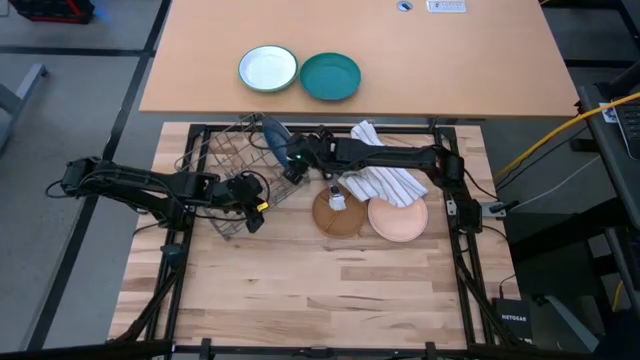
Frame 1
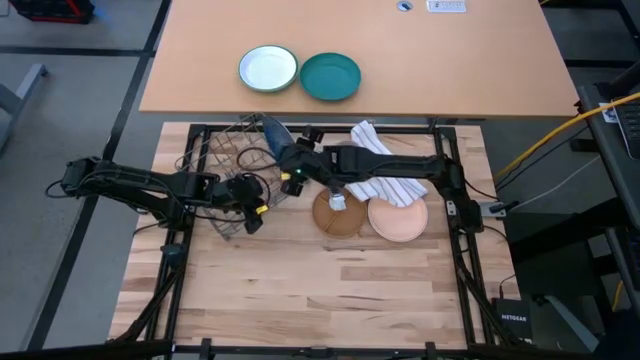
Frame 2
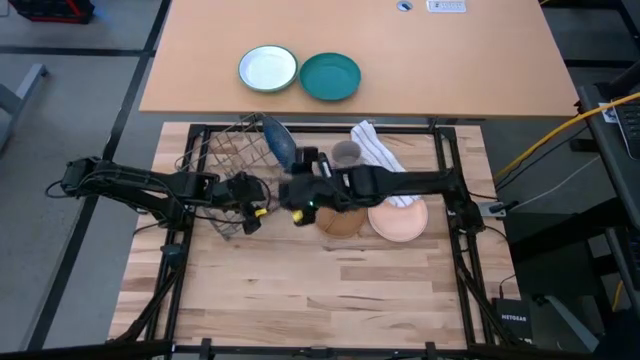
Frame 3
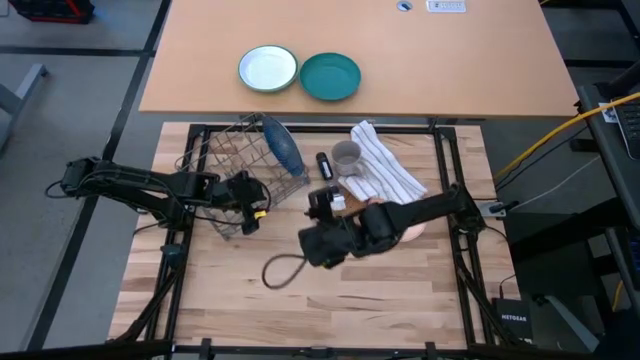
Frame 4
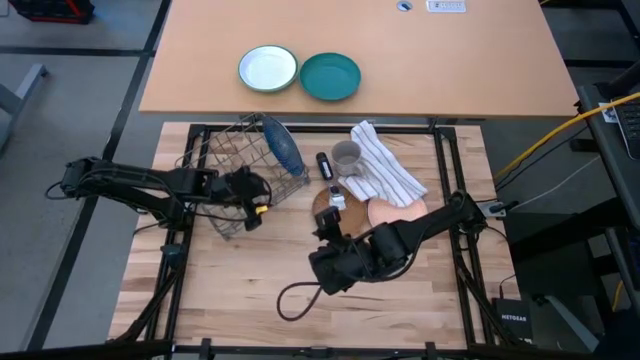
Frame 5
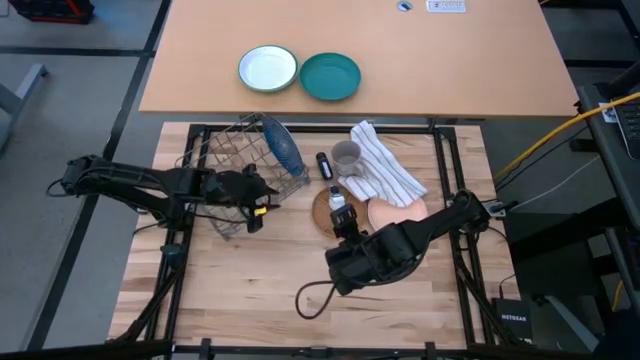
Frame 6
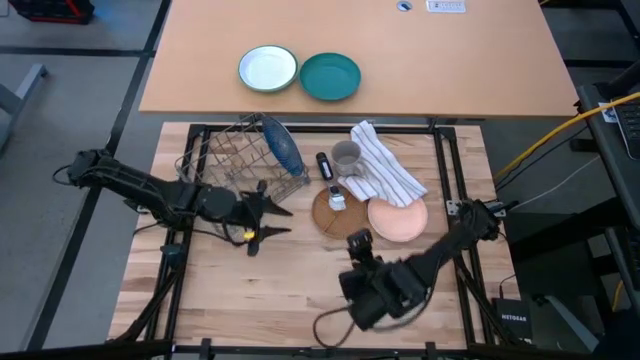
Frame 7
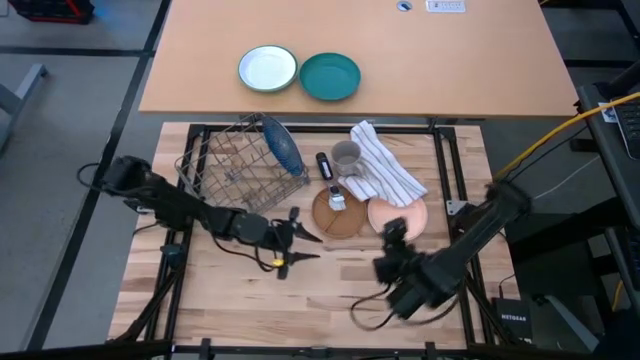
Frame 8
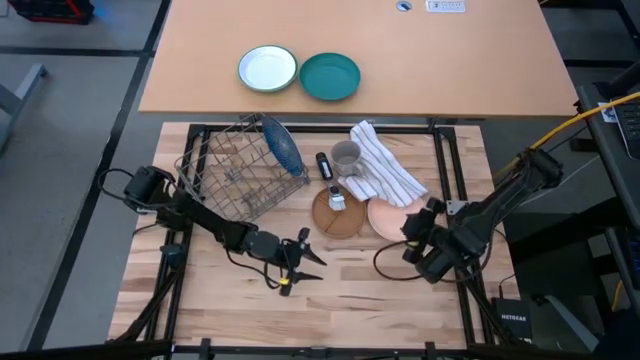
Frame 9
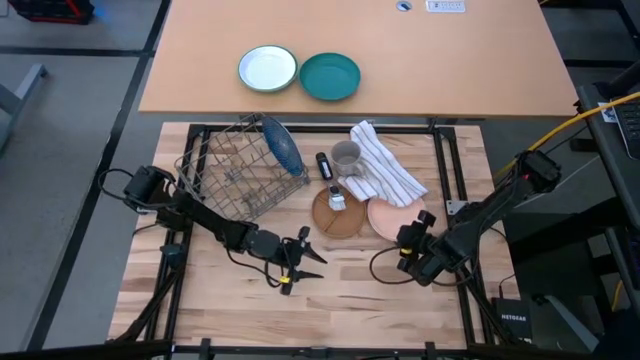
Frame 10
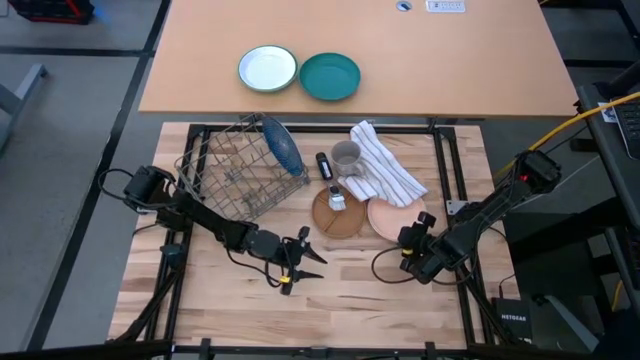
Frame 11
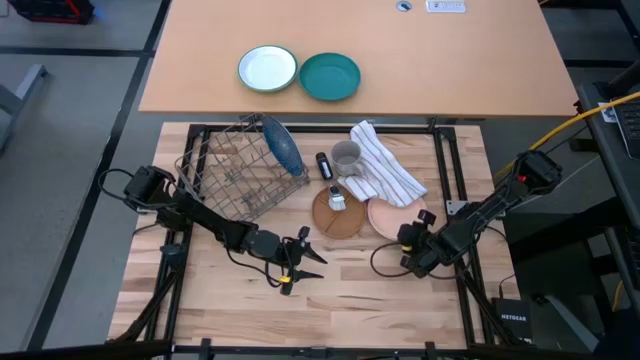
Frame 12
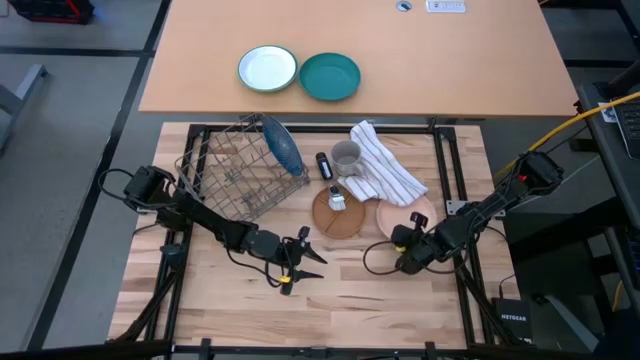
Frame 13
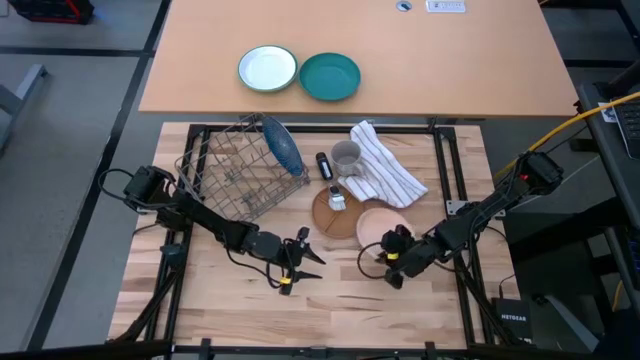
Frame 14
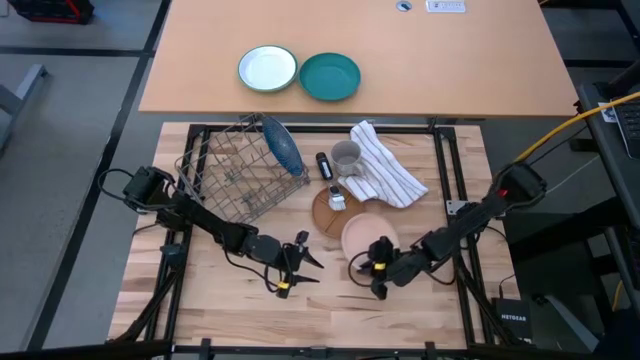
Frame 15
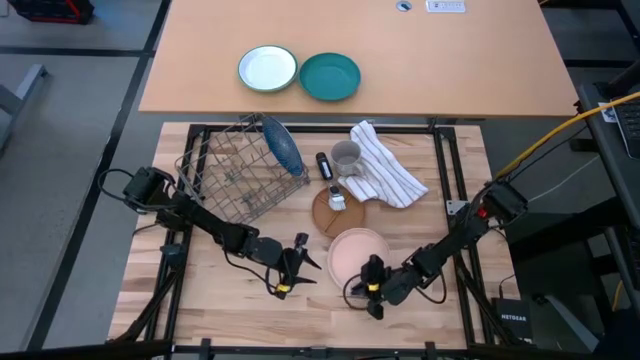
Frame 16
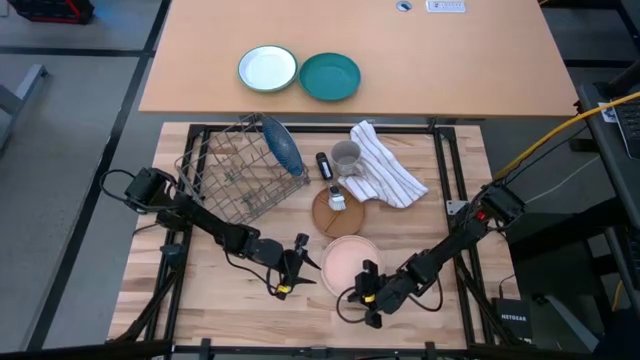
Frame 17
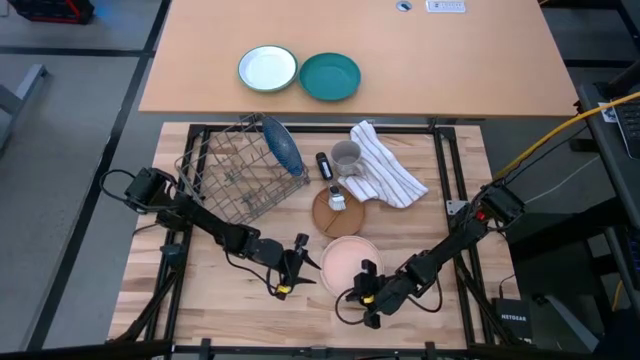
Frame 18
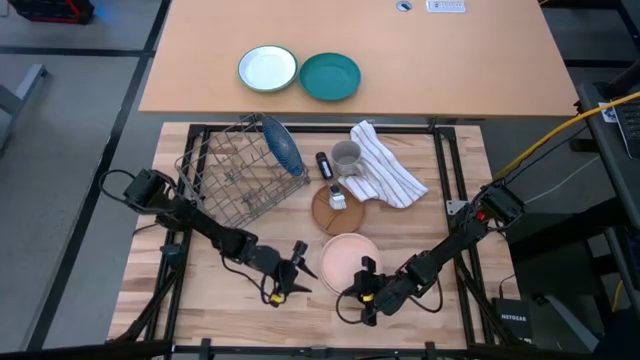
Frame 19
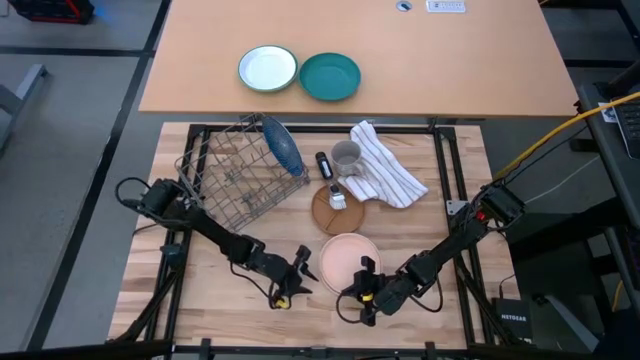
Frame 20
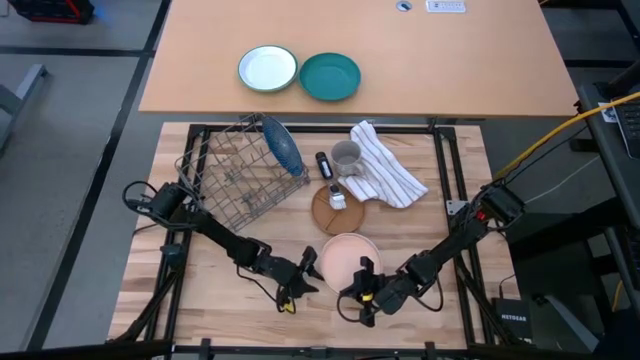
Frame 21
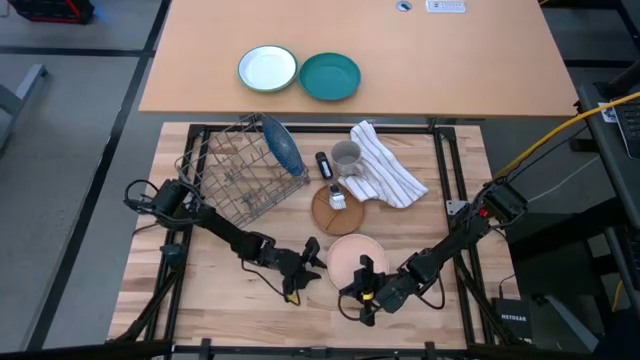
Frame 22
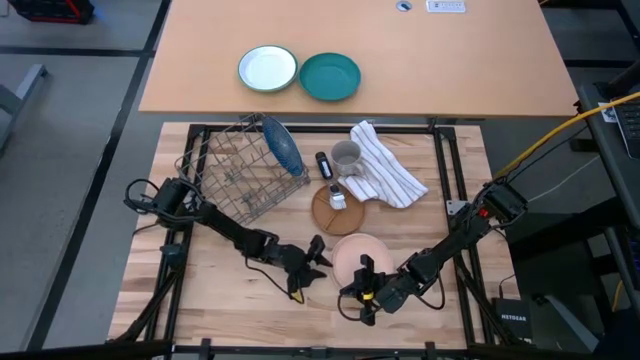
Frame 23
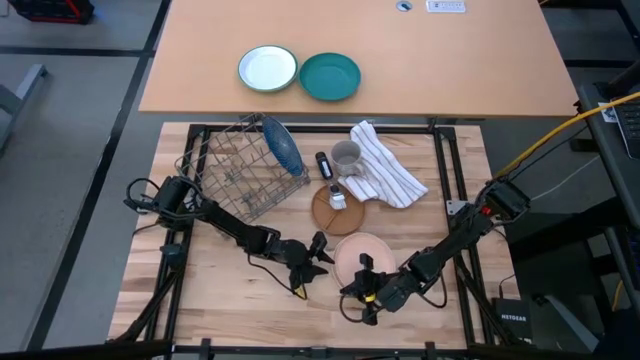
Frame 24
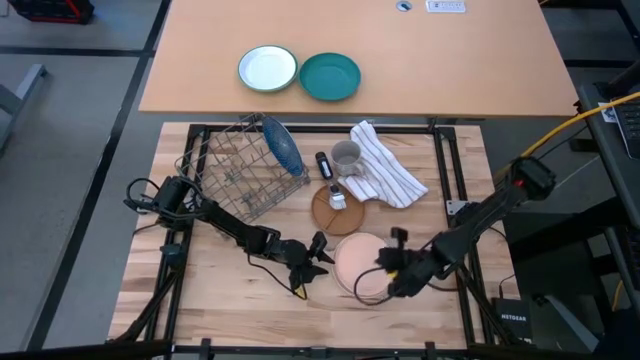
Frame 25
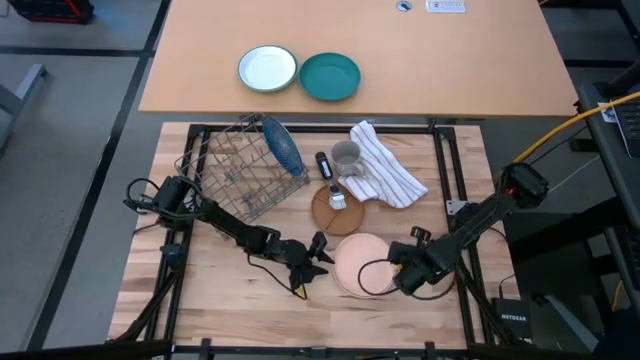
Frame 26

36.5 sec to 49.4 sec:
Task: Sort dishes
Put the light orange plate into the dish rack

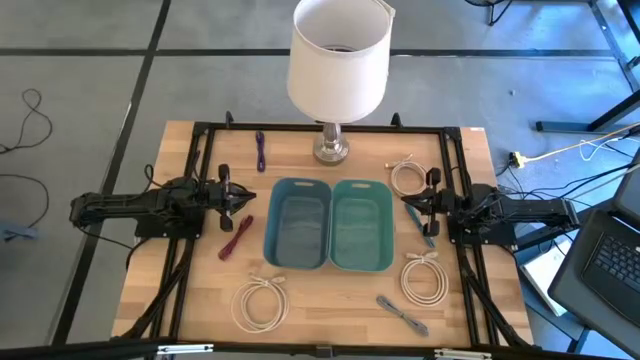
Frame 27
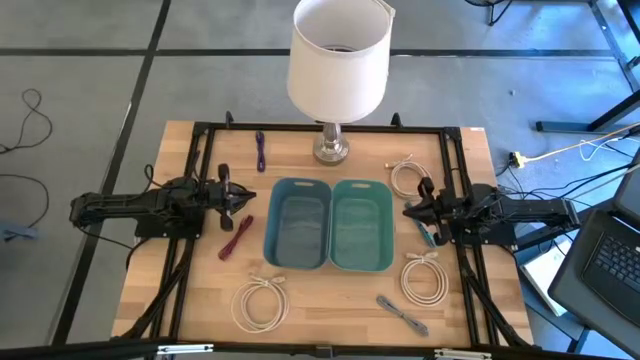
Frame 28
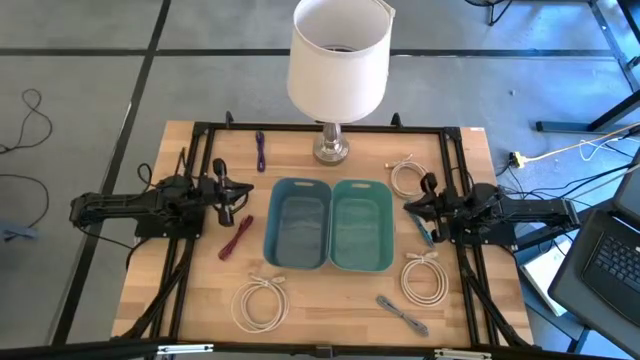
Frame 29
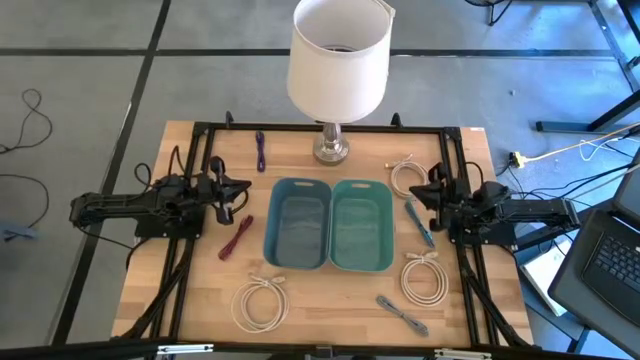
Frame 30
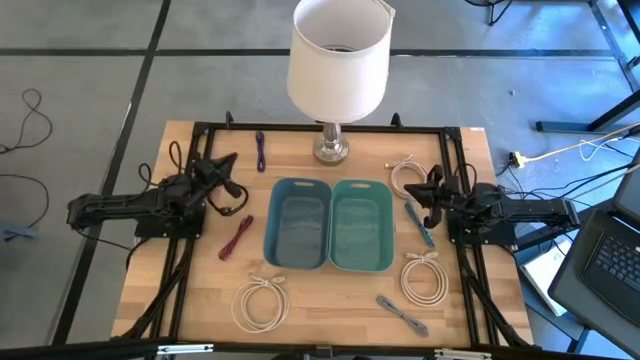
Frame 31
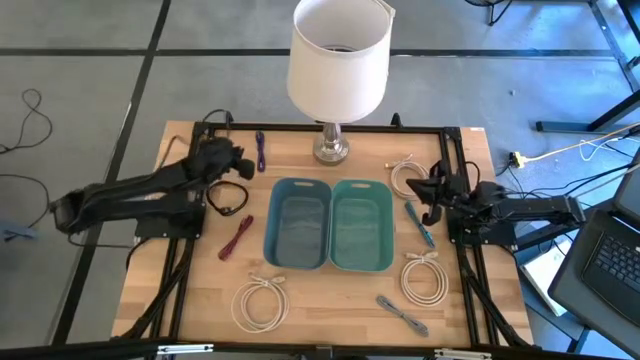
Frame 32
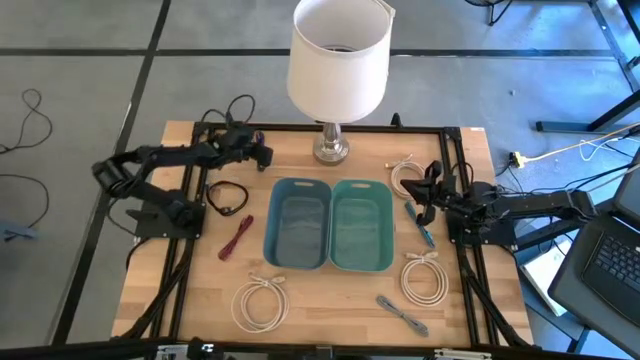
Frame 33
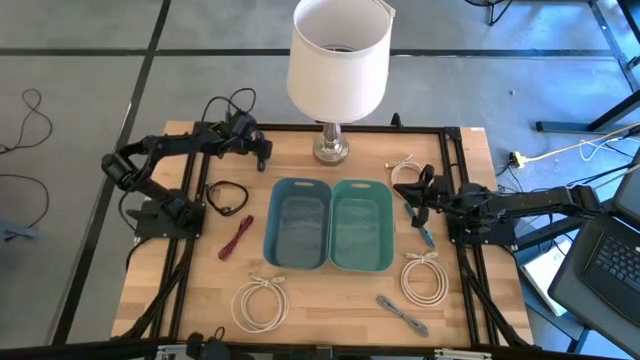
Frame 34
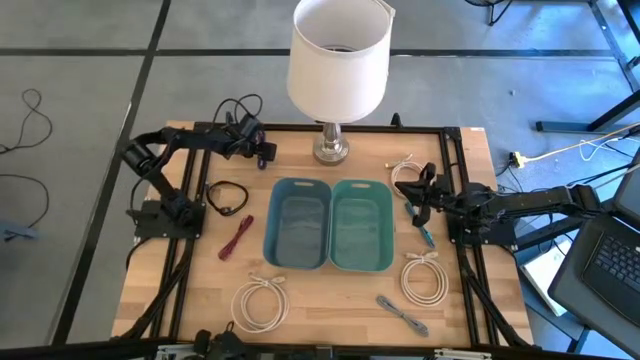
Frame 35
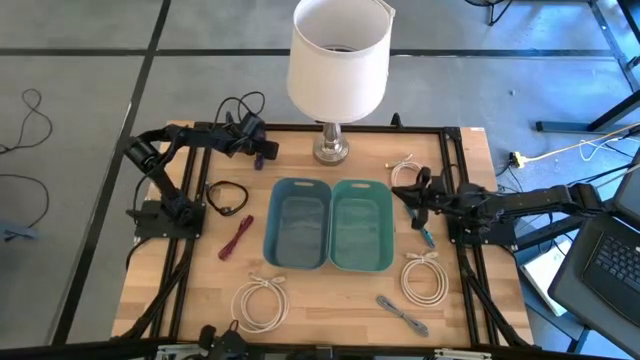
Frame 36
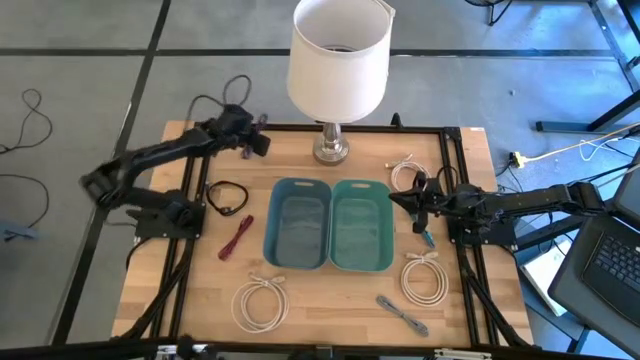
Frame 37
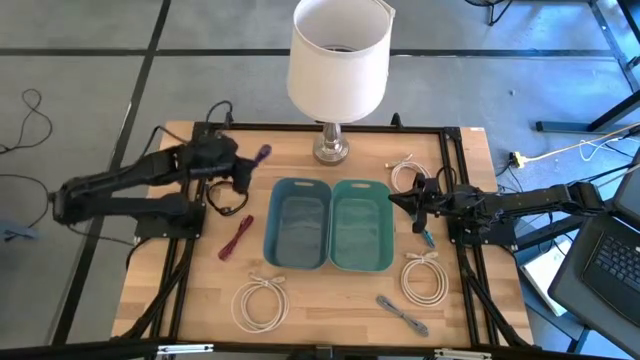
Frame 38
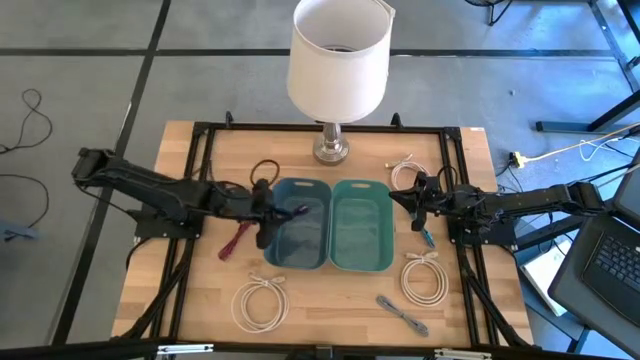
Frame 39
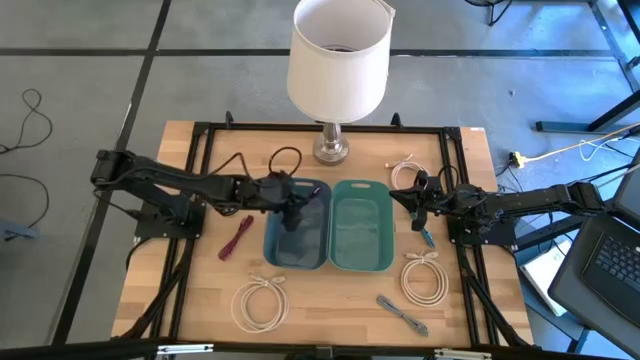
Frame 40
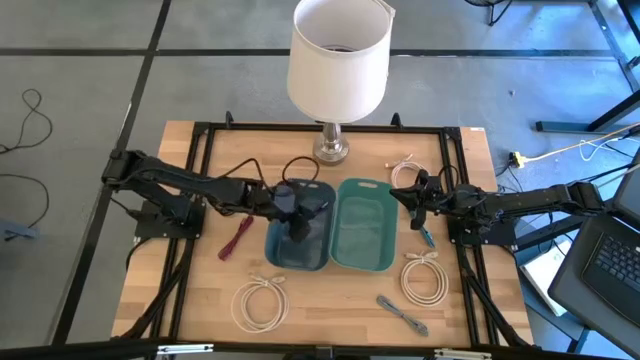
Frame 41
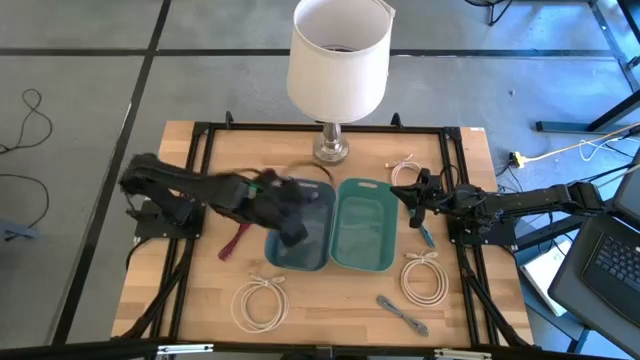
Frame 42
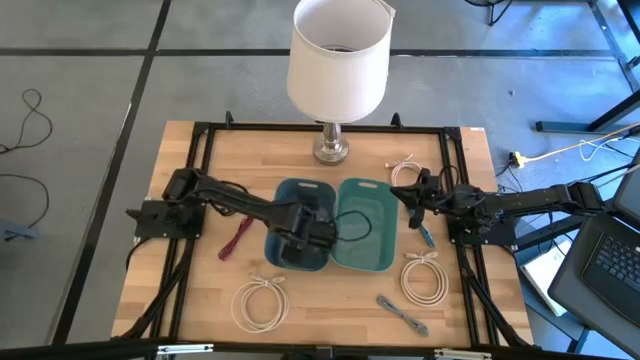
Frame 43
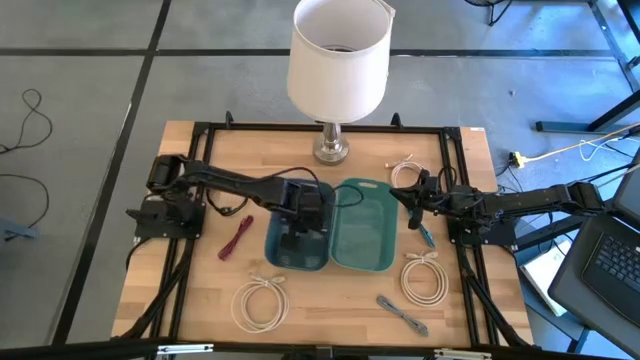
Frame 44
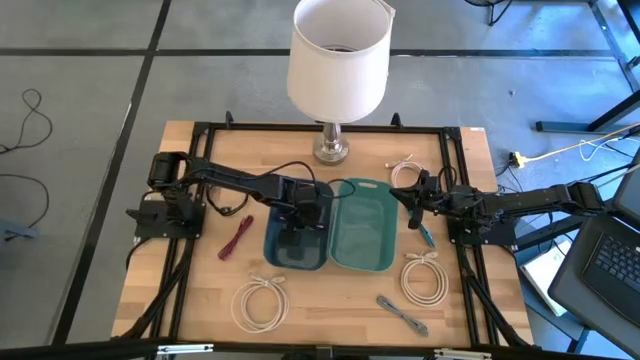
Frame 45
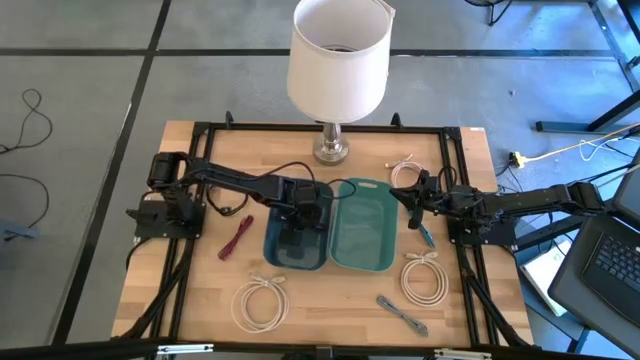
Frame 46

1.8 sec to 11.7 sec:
Task: Pick and place items into bin
Put the purple patterned USB cable into the lue bin
